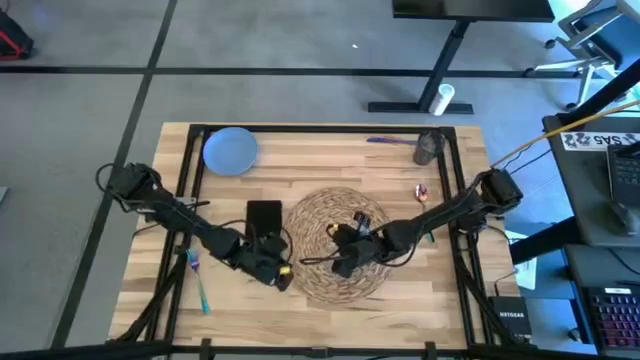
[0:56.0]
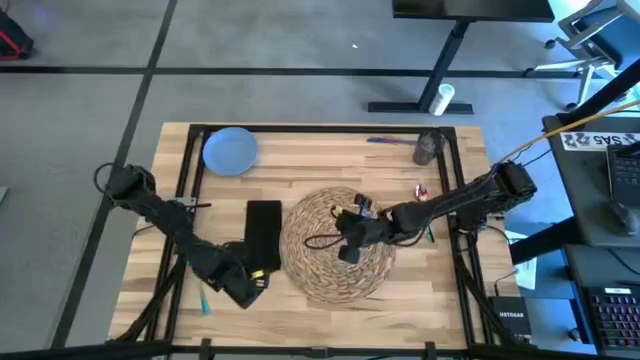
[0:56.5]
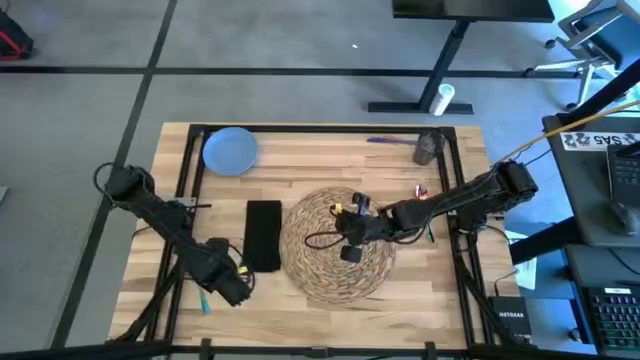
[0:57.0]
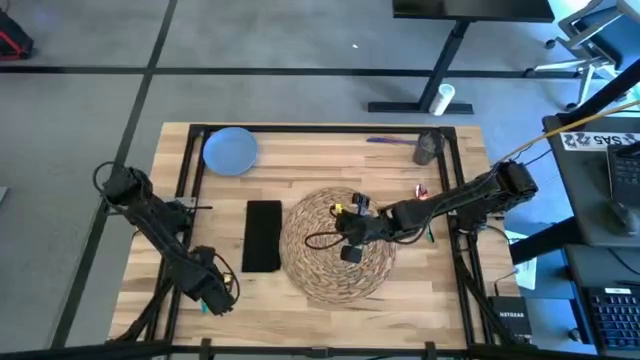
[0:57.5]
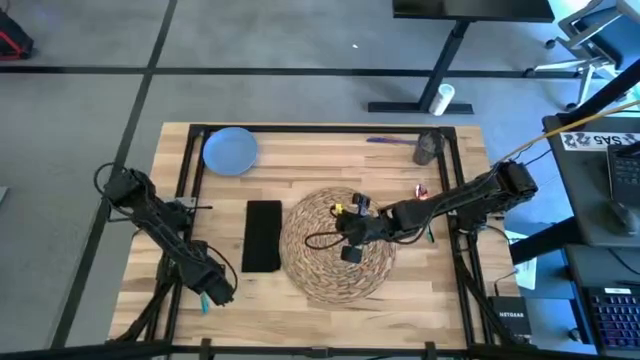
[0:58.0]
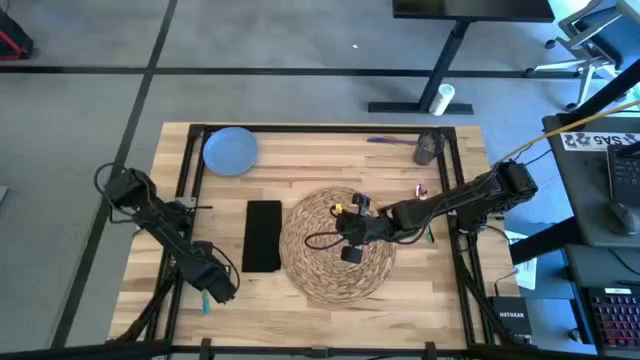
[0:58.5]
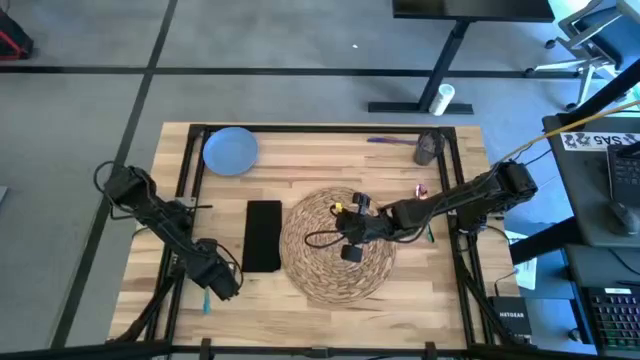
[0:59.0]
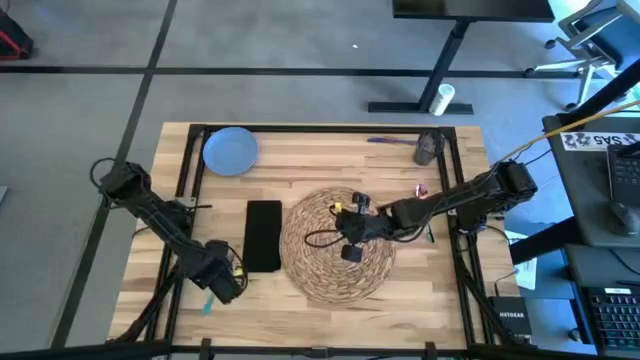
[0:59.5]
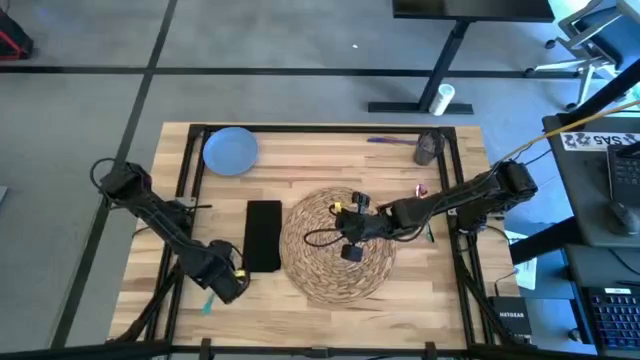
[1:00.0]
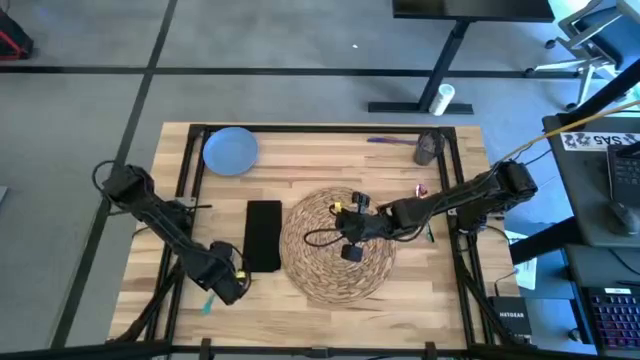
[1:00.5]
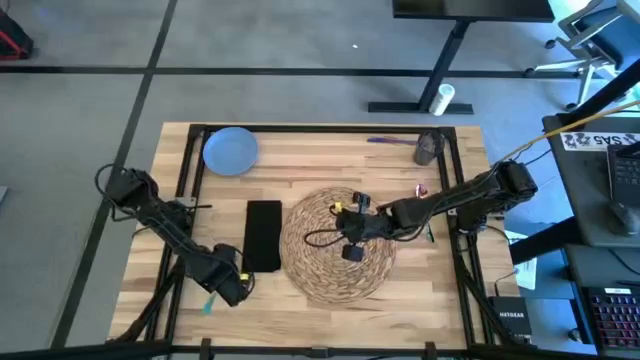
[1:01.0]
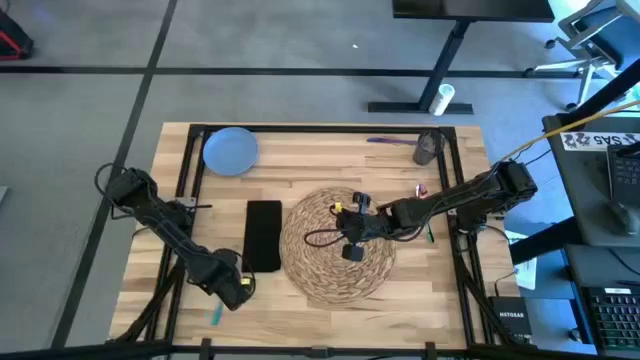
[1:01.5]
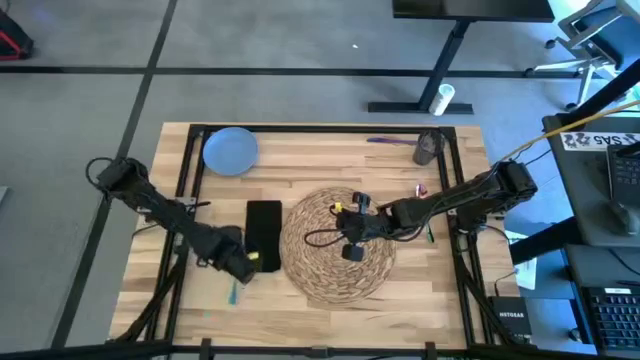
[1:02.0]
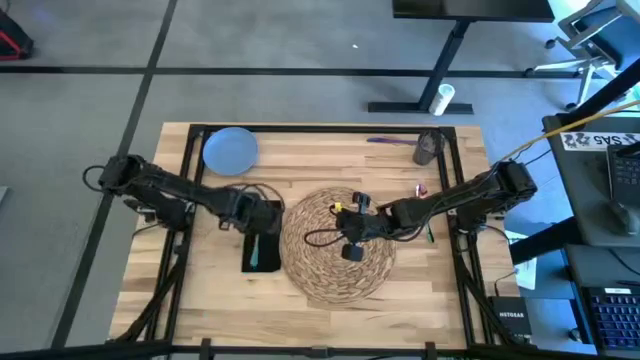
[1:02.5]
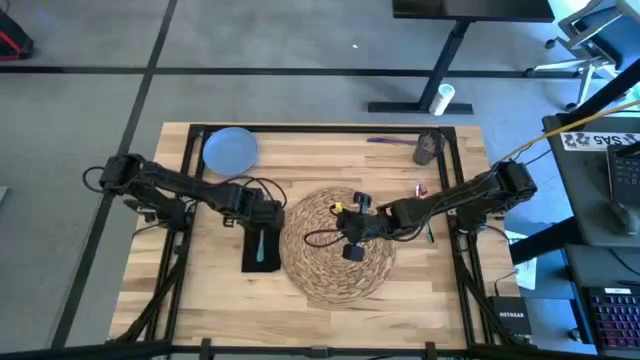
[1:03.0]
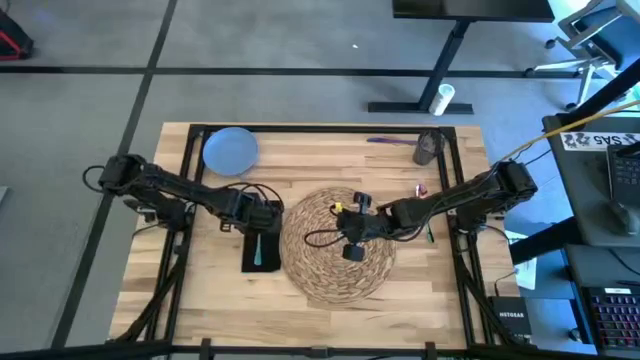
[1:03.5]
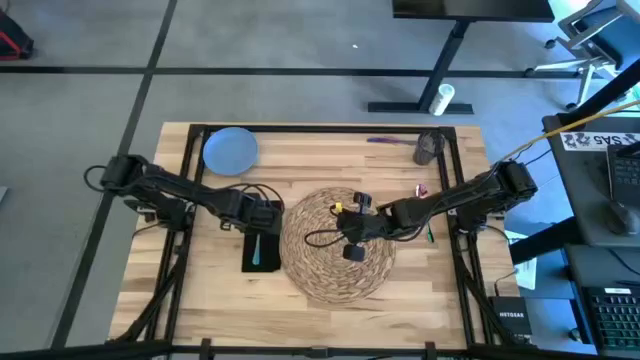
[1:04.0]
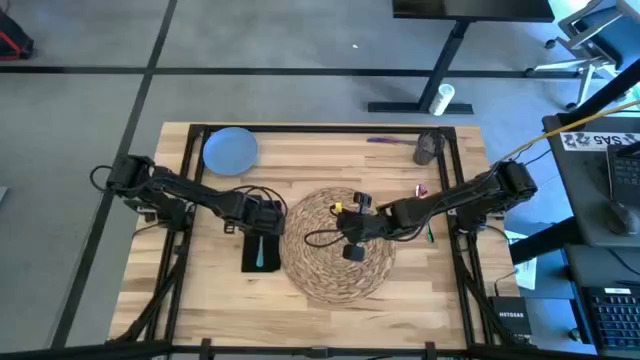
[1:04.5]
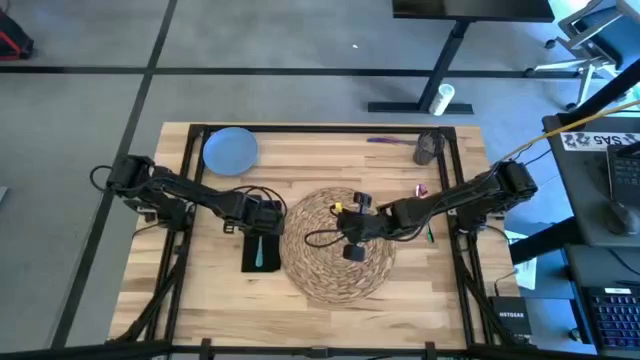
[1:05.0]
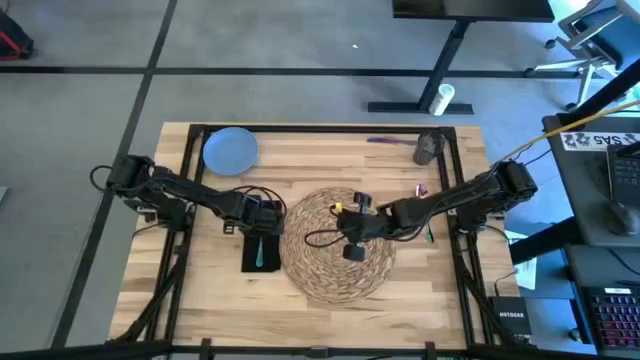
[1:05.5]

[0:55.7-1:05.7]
Task: Set table place
Put the blue fork on top of the black table napkin

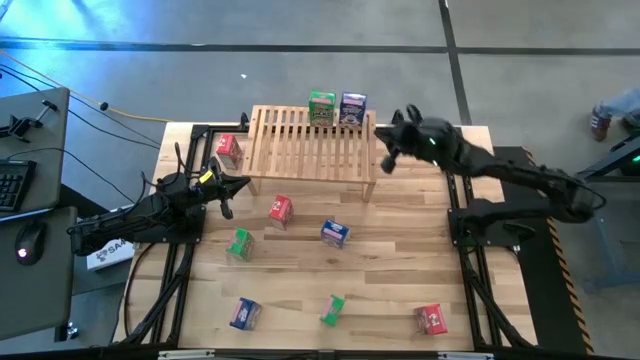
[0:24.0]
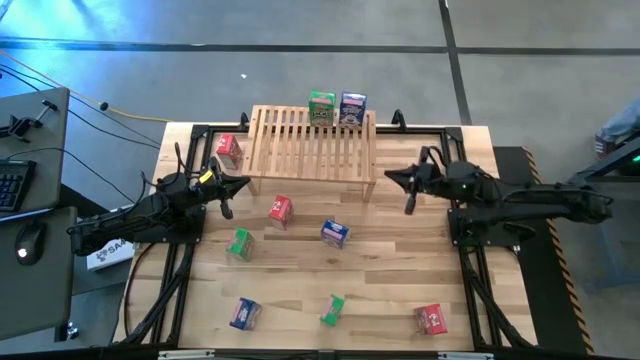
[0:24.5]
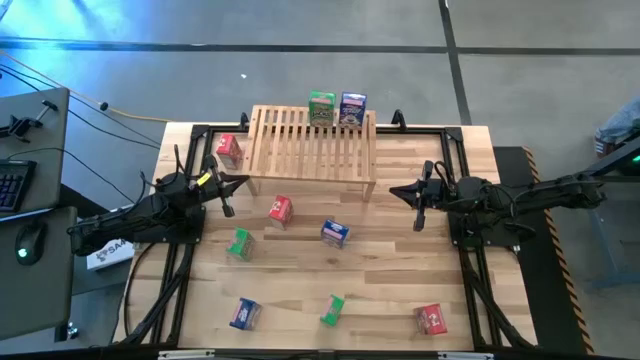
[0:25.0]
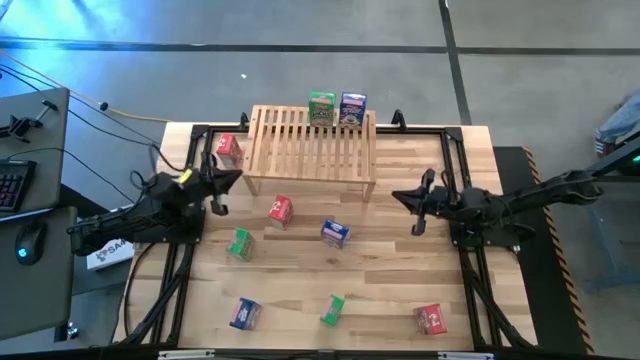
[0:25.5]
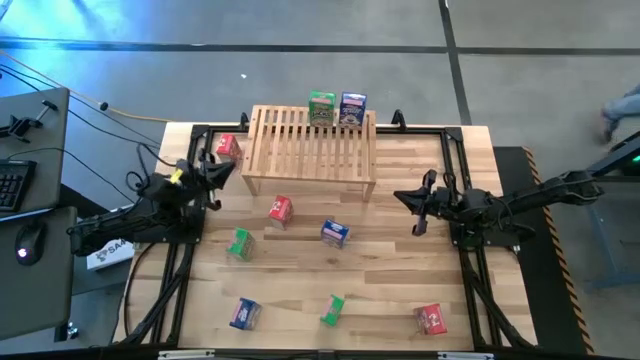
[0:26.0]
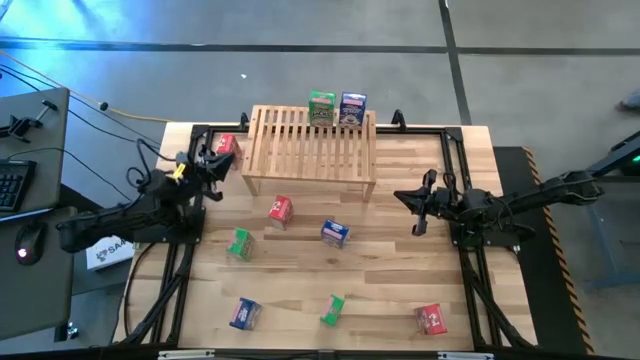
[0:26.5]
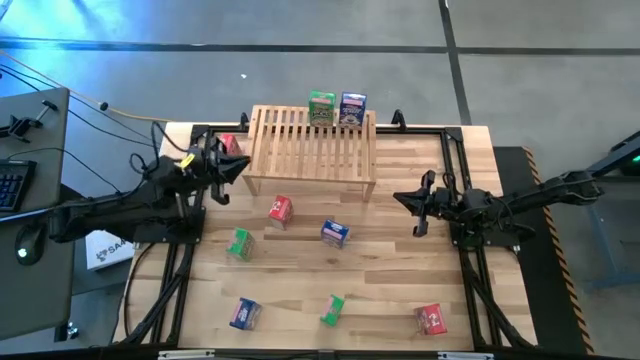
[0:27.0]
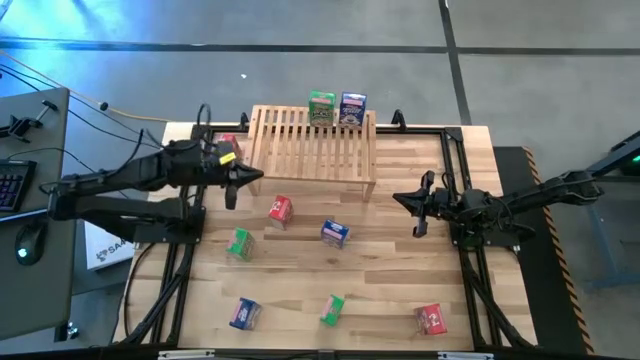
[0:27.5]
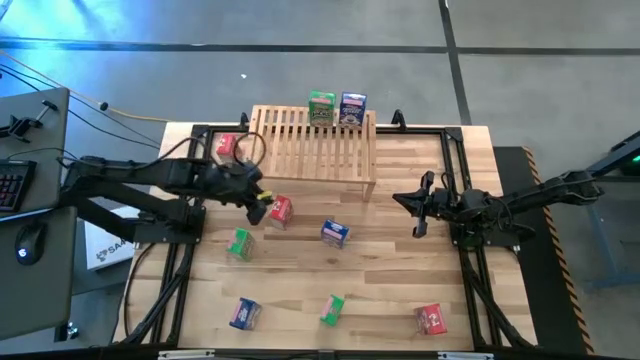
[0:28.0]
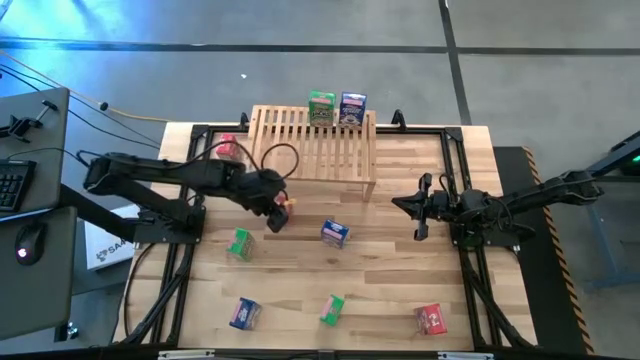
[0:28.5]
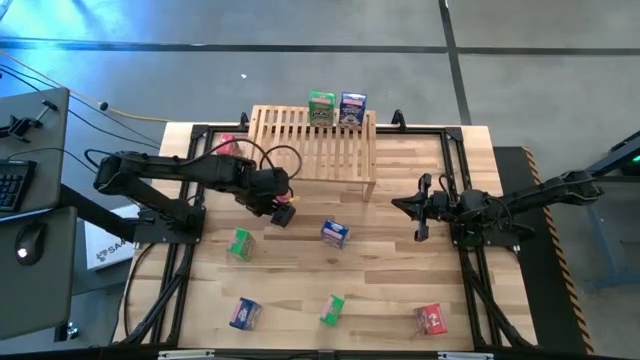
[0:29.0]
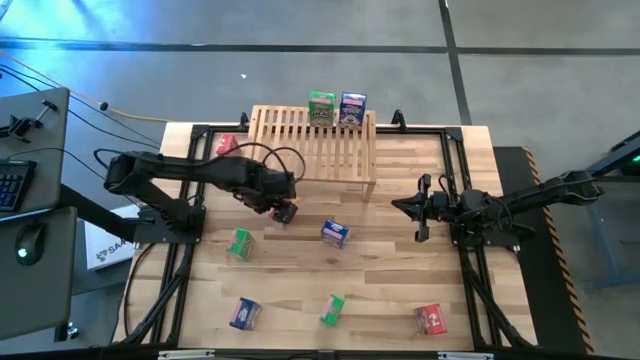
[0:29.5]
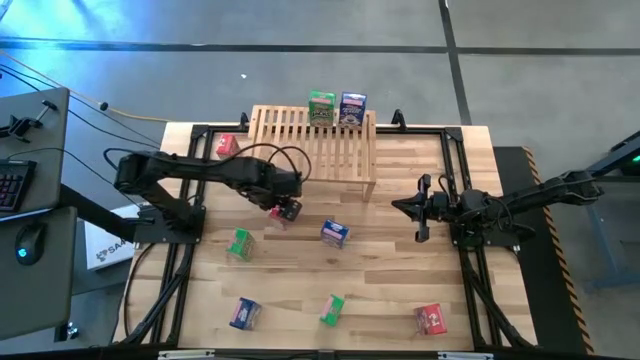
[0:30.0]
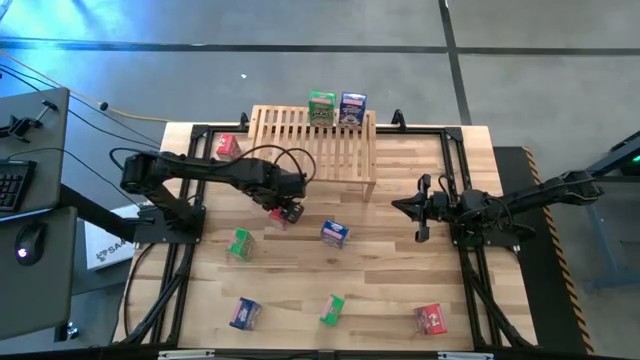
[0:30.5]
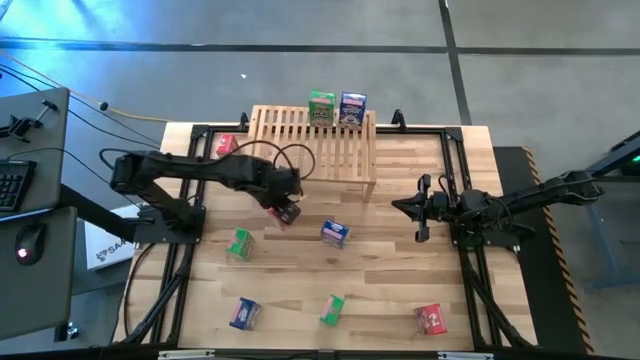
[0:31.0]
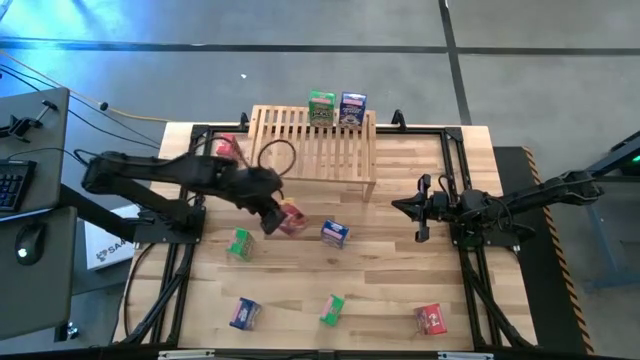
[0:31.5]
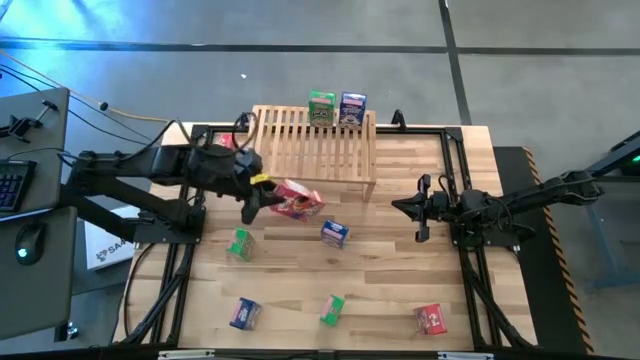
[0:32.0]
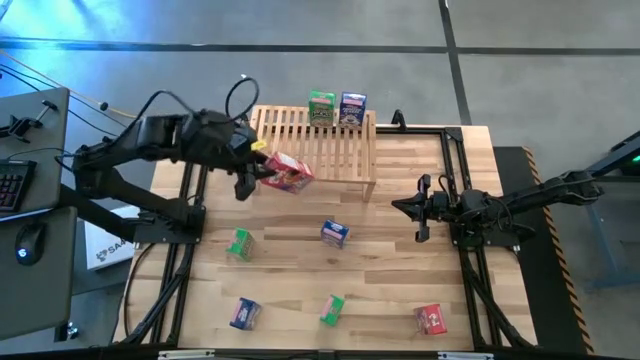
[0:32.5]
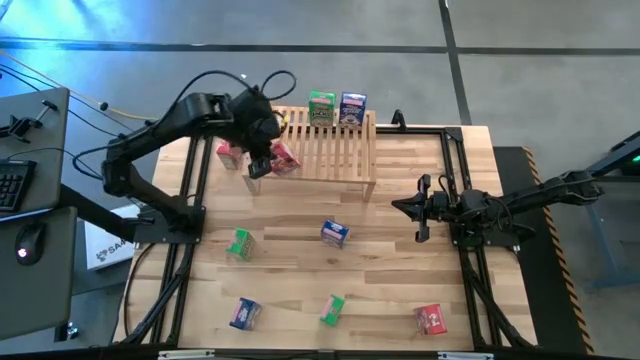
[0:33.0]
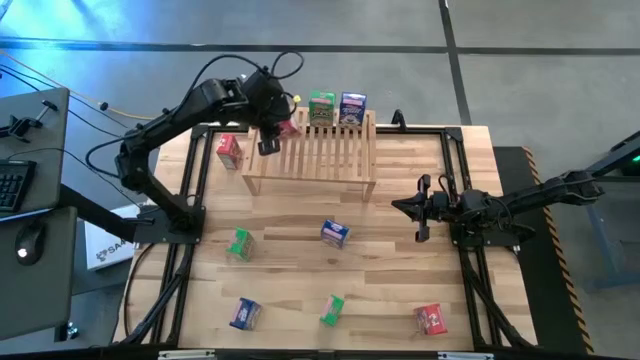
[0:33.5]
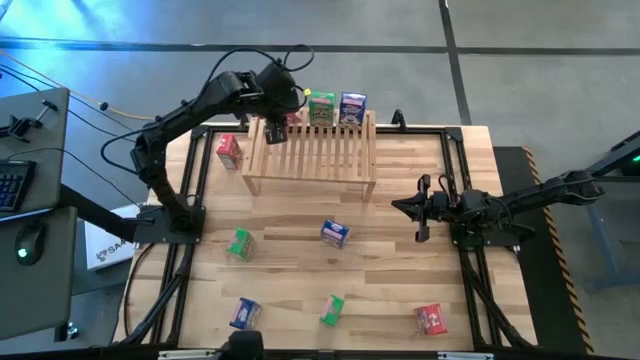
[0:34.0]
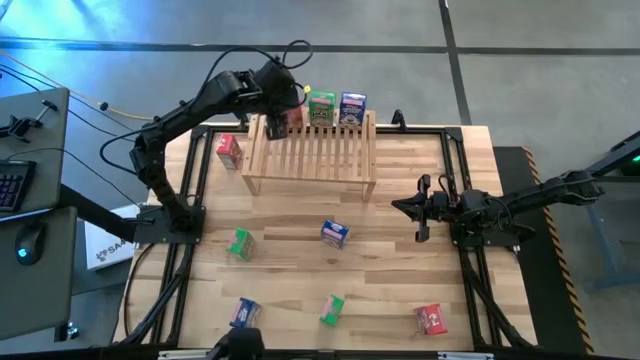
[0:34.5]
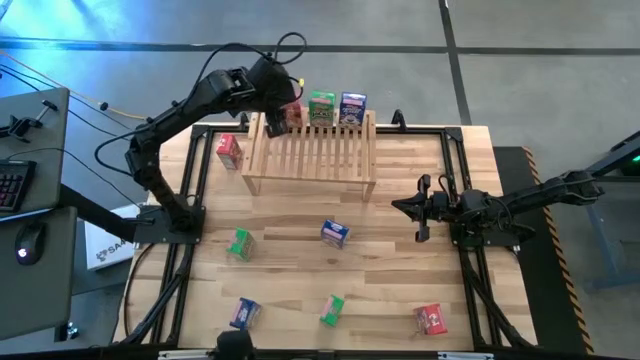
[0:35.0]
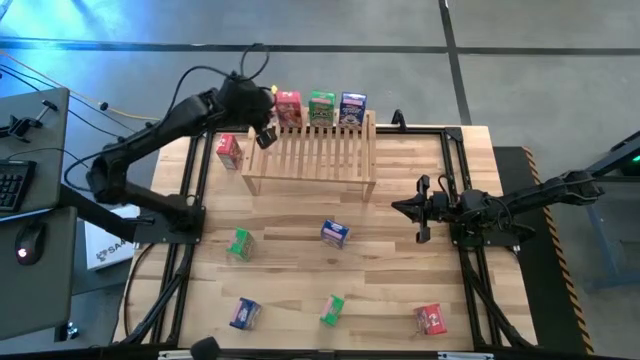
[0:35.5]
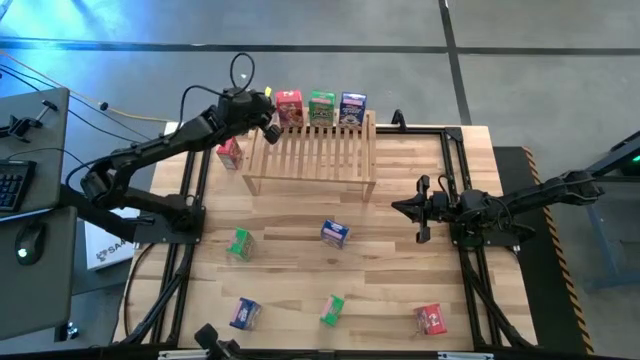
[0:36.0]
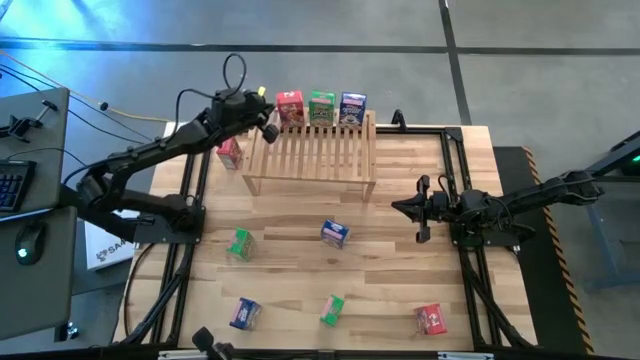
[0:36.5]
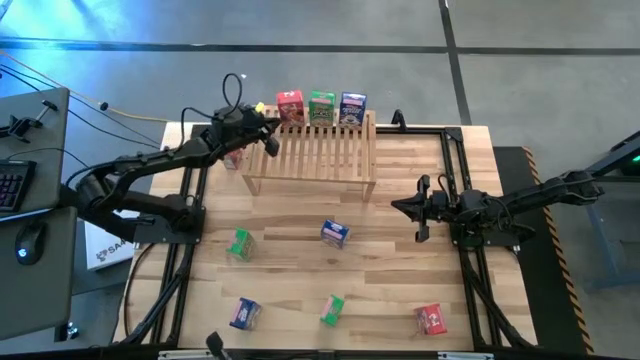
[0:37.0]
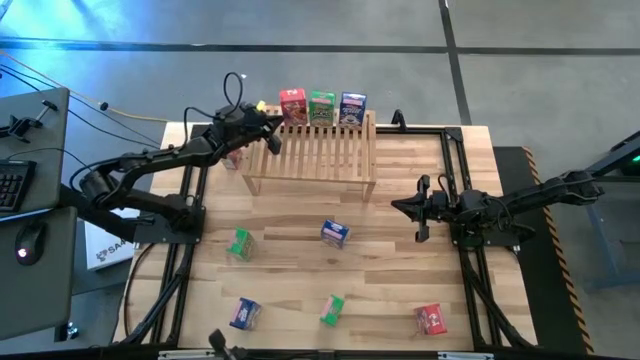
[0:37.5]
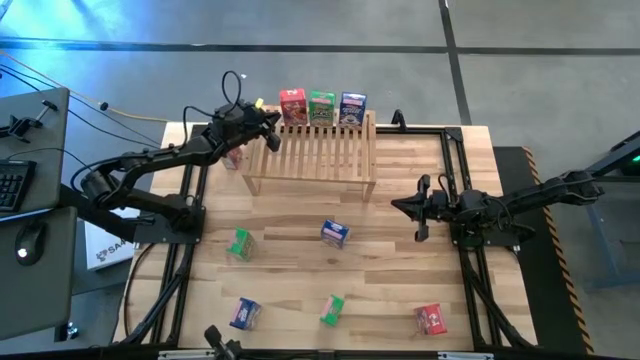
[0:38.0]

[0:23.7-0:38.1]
Task: Stack cereal on shelf
Put the center red cereal box on the shelf
